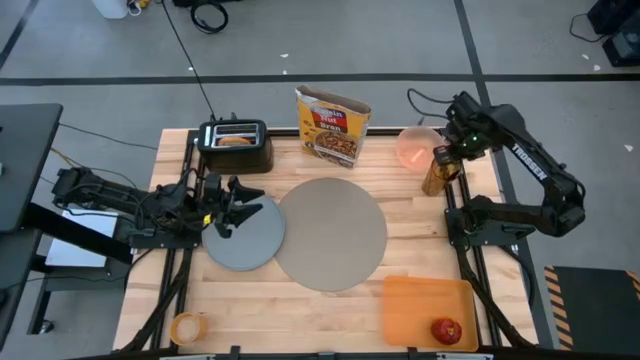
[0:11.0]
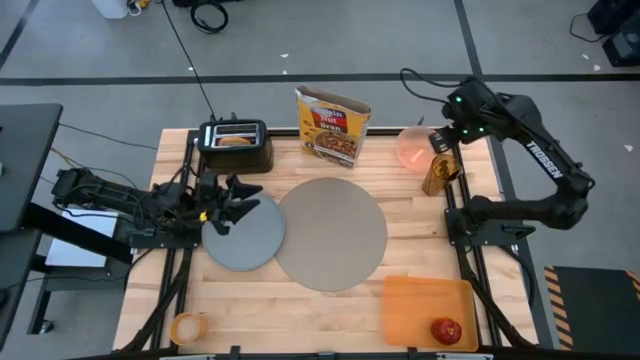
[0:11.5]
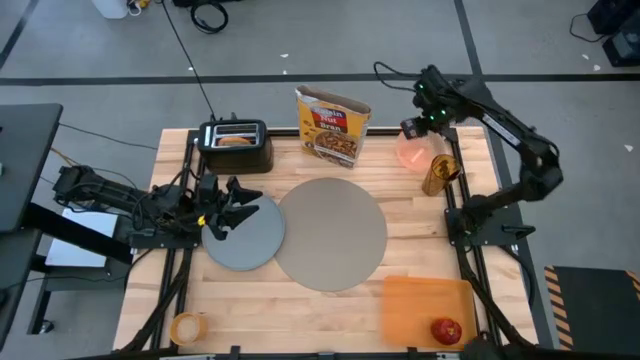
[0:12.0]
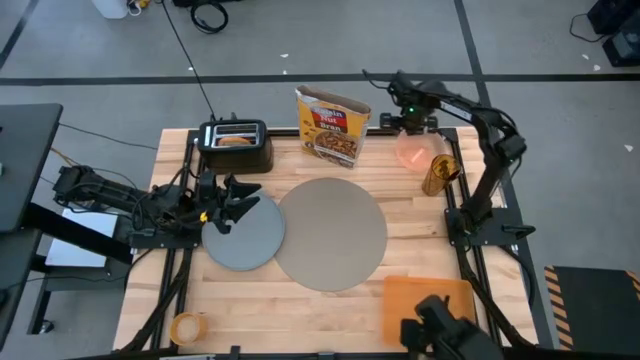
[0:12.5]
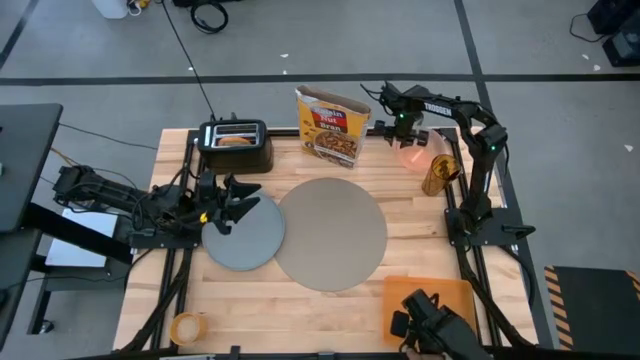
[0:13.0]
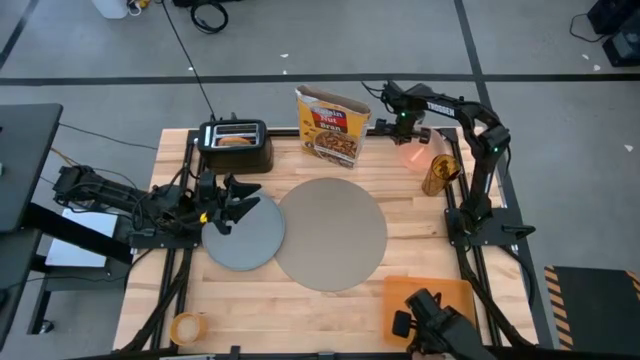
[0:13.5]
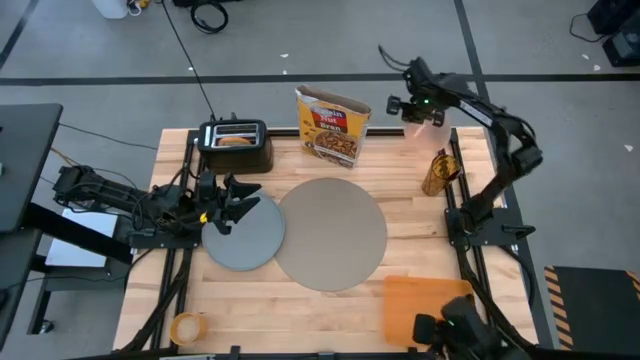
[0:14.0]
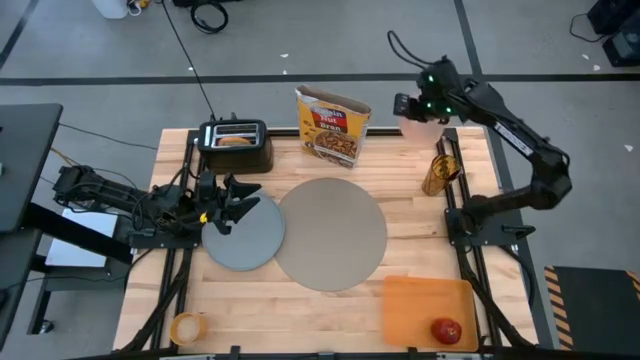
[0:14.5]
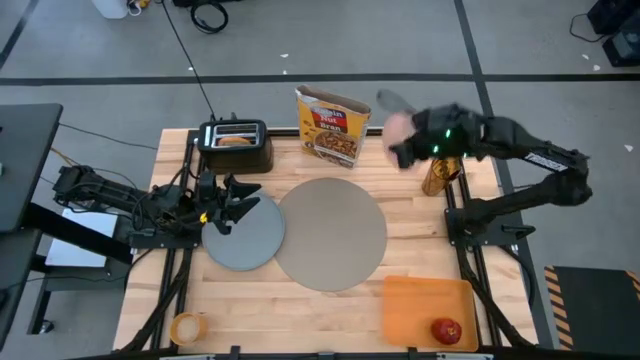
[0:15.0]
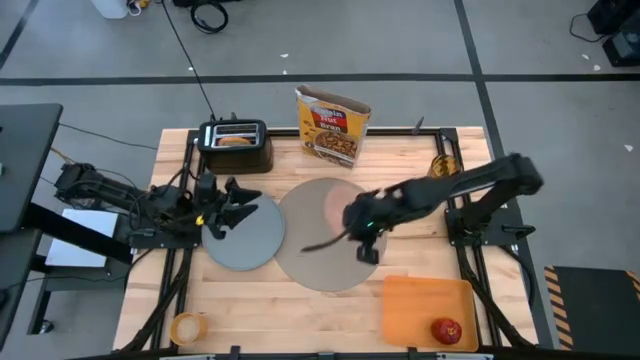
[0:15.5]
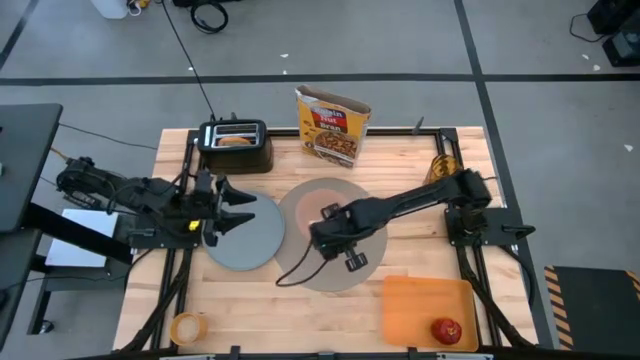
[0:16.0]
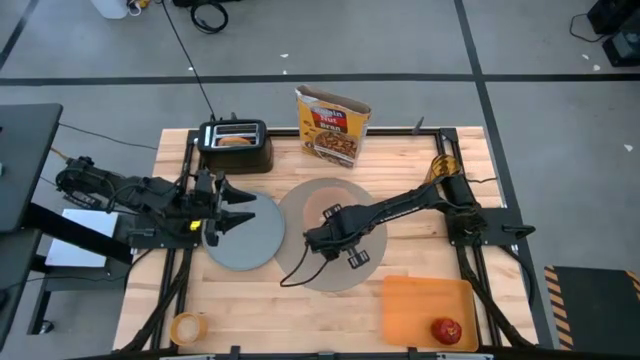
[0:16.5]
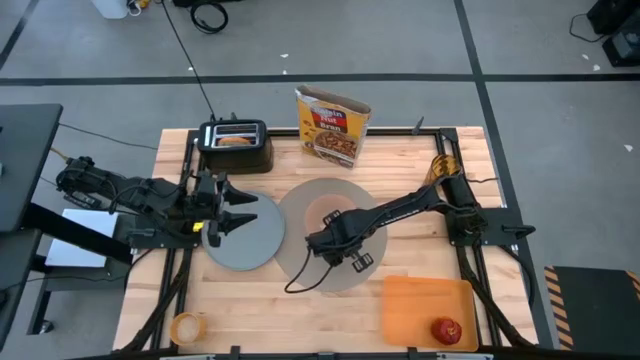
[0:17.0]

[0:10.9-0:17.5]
Task: Arrange a breakfast setting
Put the orange bowl on the gray placemat

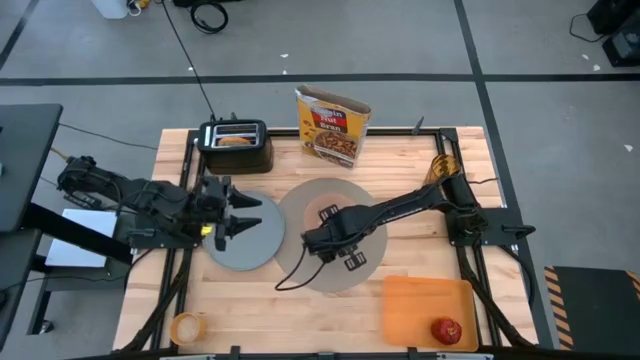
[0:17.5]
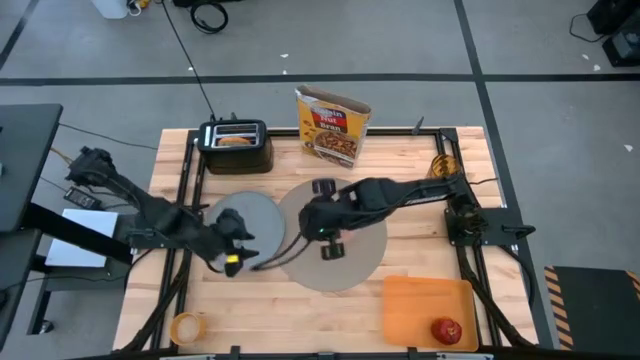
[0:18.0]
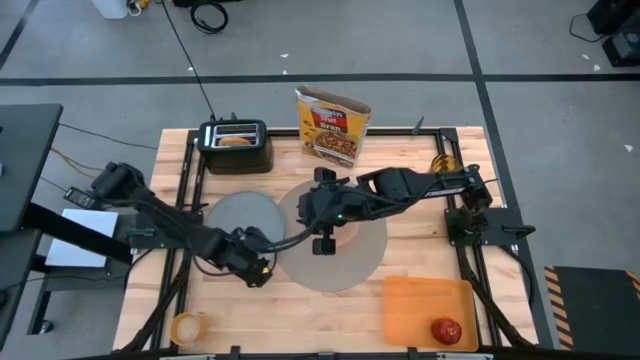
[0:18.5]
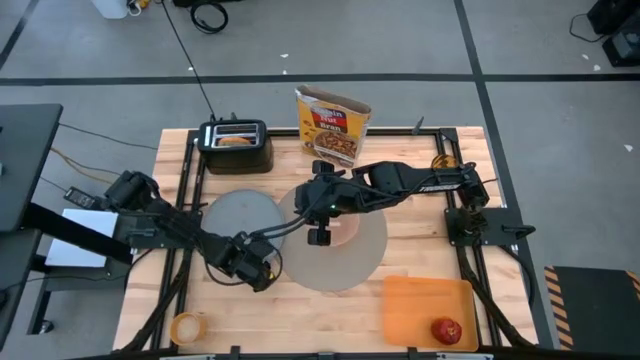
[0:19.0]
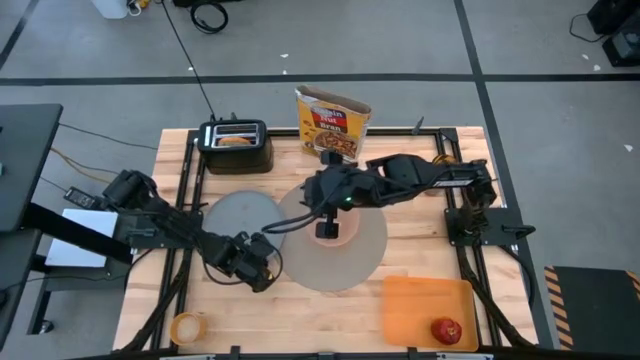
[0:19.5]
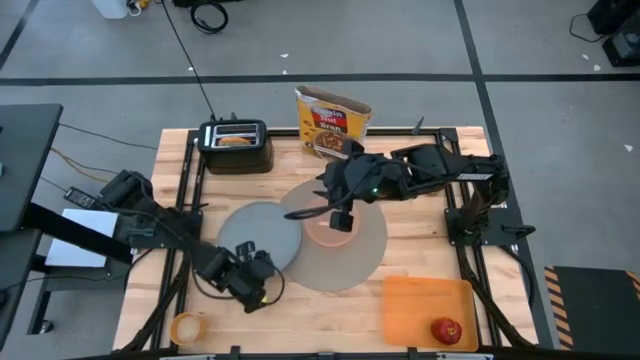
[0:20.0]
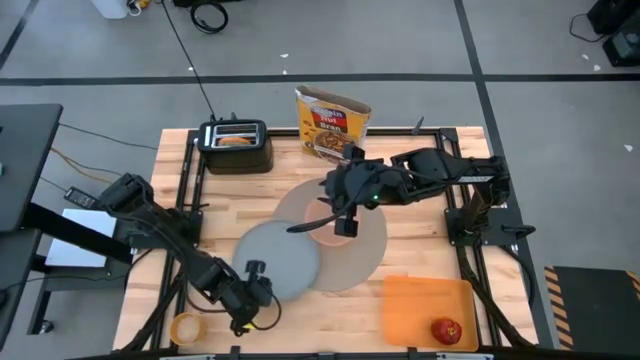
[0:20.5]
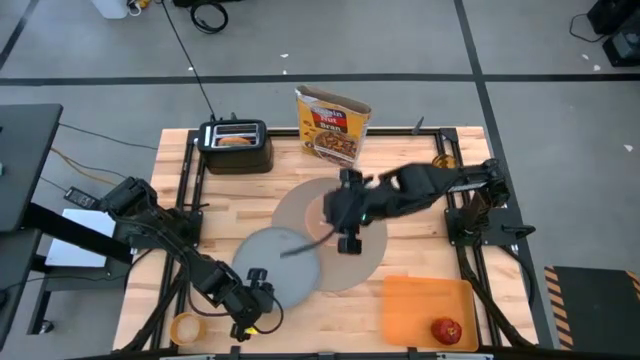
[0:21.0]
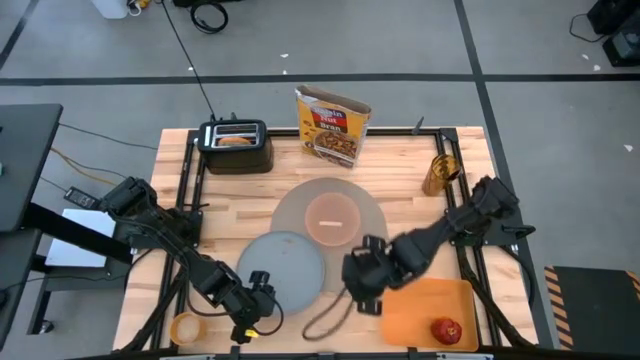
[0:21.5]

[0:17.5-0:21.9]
Put the blue plate on the gray placemat to the bottom left of the orange bowl

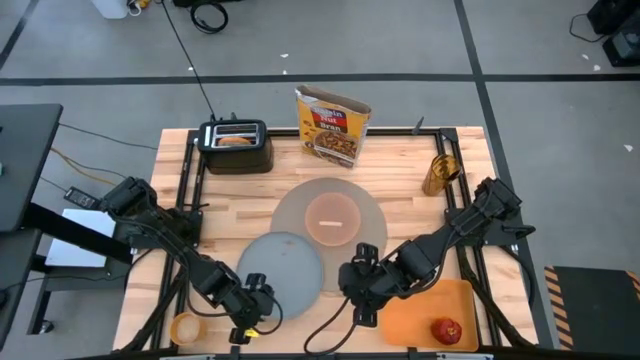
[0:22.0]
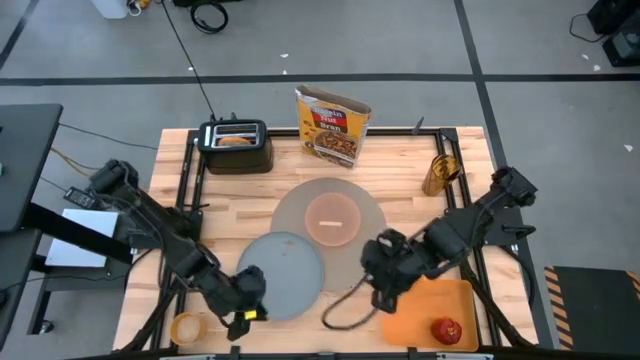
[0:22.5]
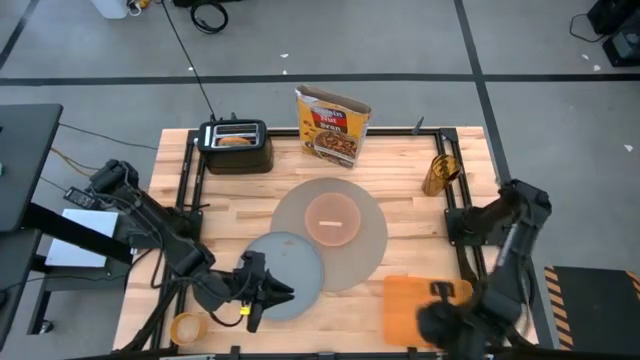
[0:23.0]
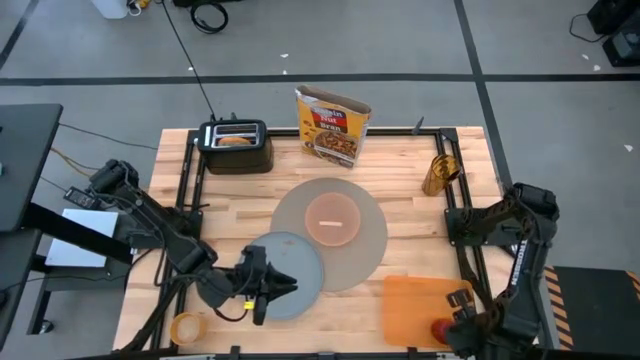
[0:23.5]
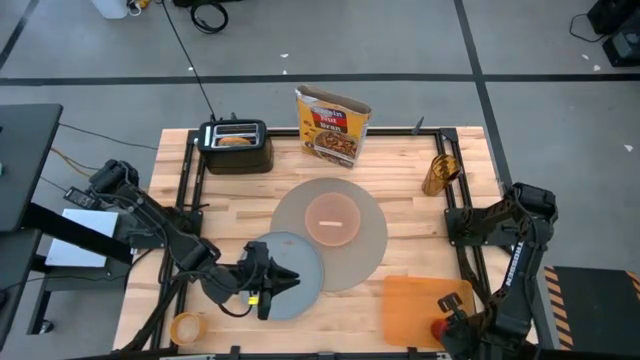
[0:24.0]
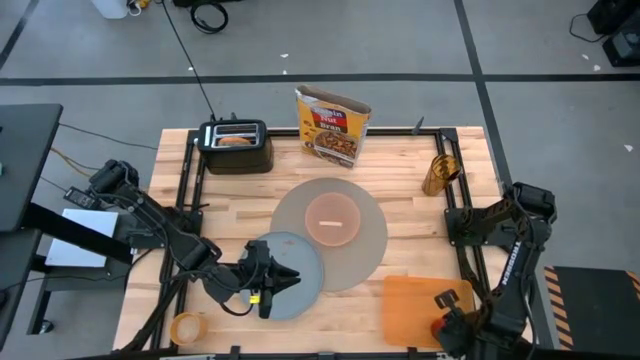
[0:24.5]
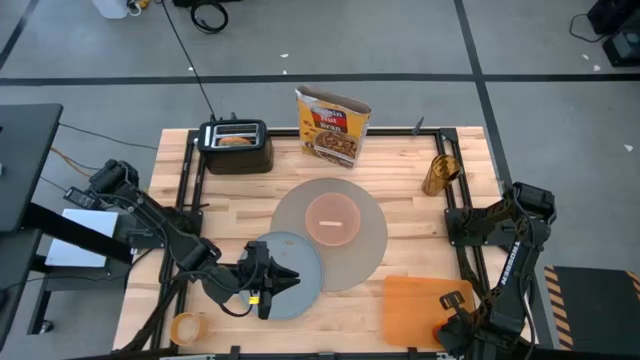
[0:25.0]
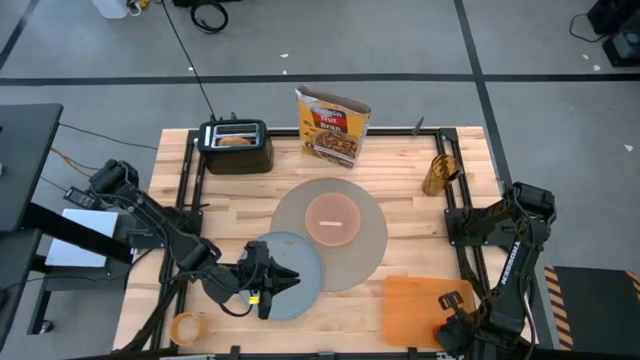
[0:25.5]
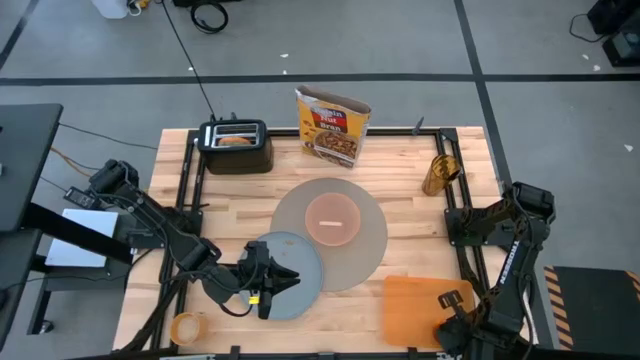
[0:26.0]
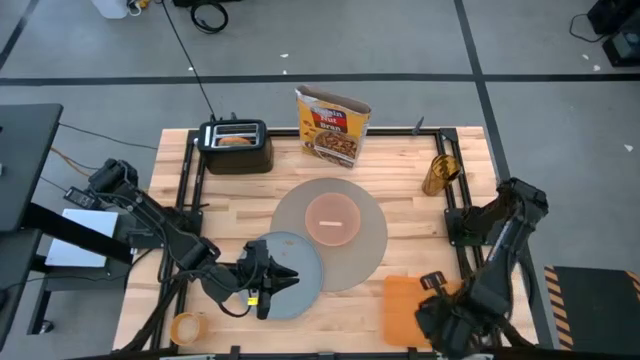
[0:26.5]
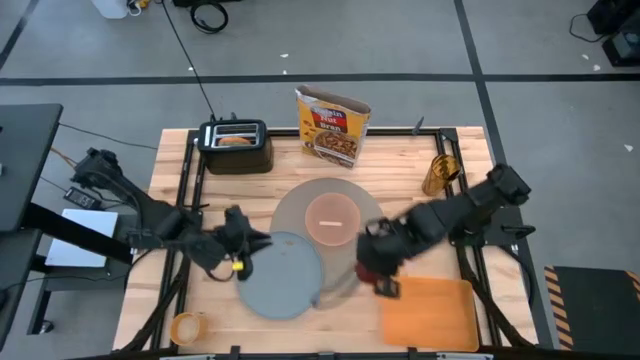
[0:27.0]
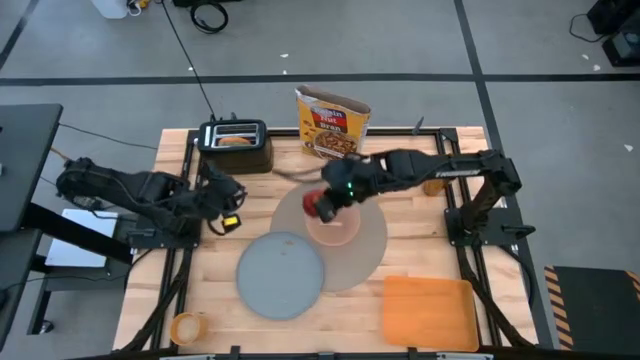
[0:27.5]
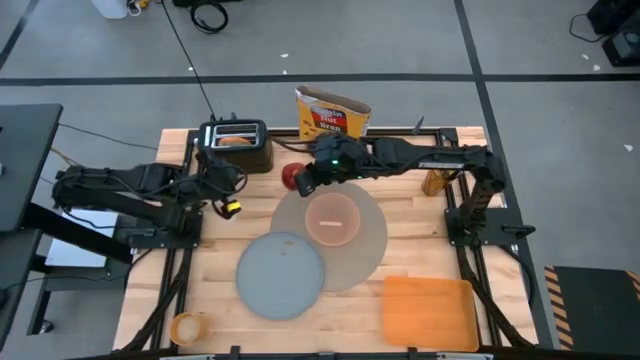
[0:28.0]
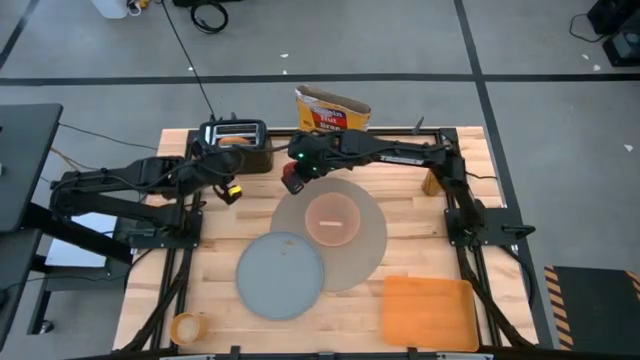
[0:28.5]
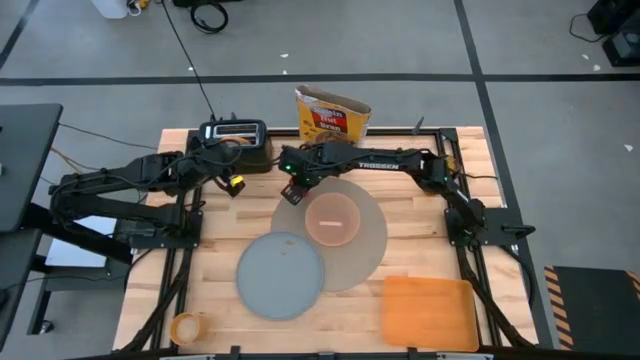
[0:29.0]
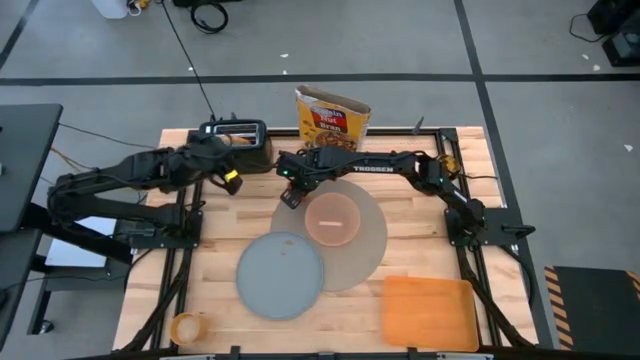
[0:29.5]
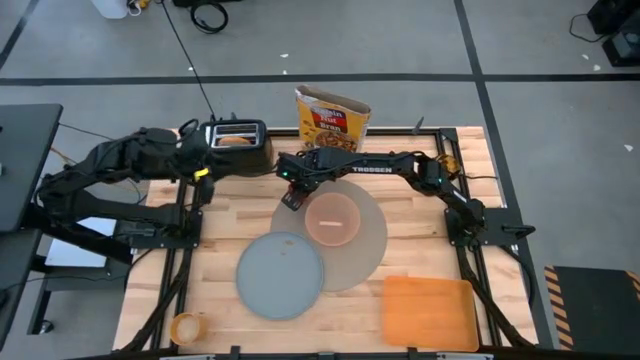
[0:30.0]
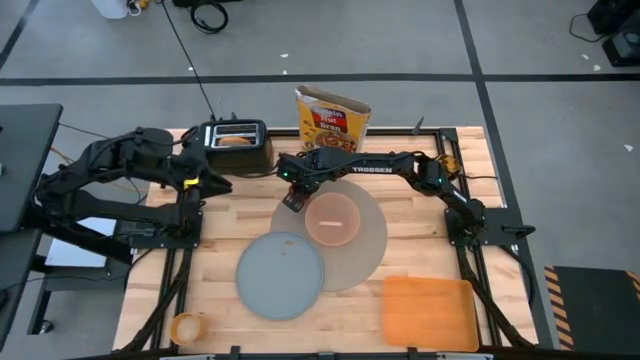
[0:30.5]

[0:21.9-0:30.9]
Put the red apple on the gray placemat at the top left of the orange bowl

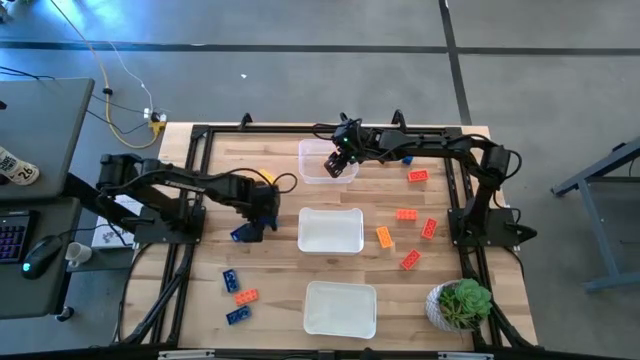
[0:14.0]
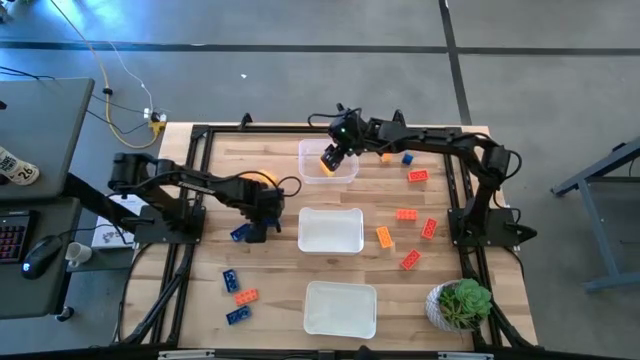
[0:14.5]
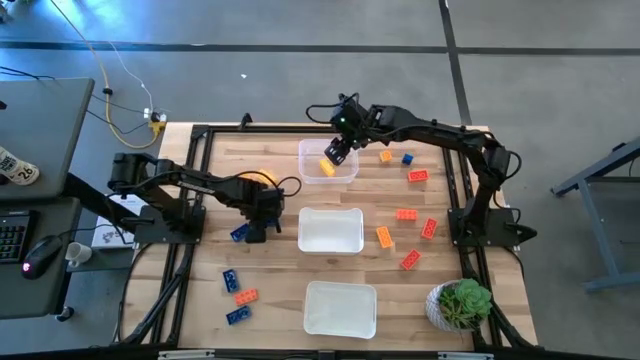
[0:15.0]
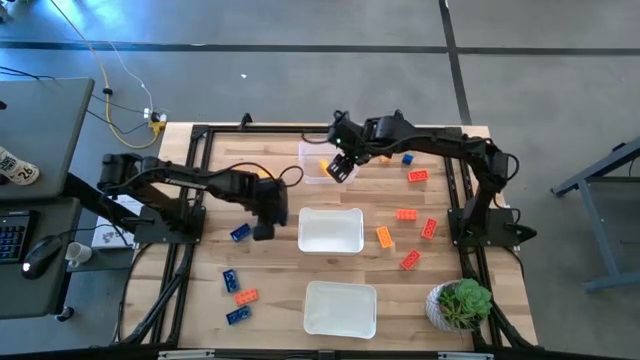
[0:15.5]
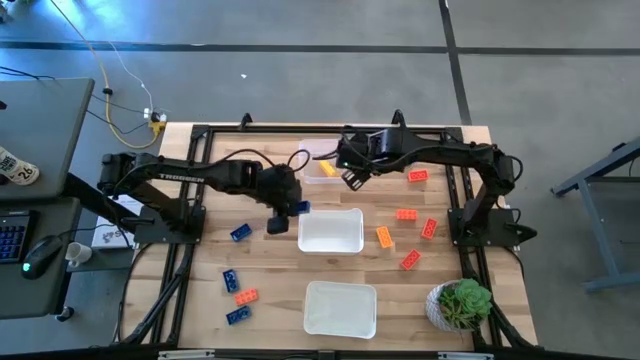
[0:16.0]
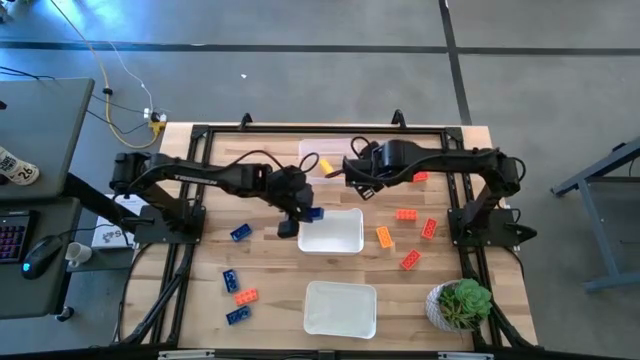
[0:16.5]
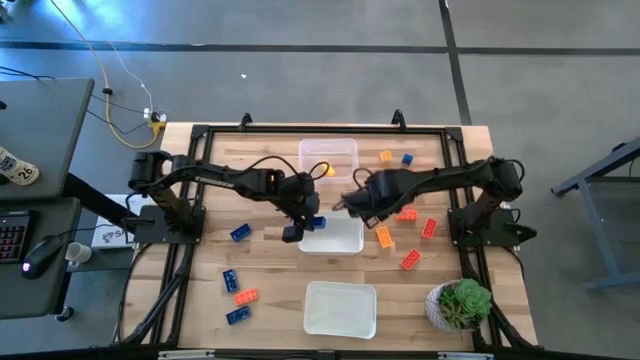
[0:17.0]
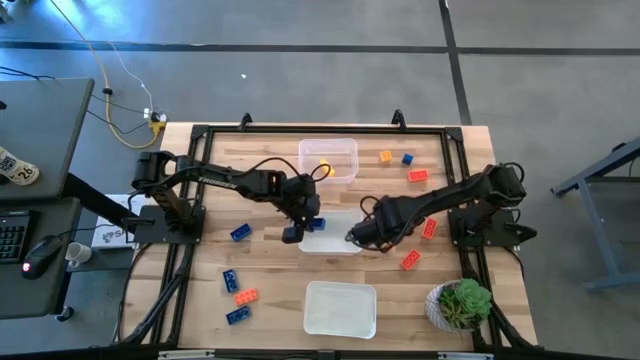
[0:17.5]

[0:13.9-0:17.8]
Task: Sort & place blocks by color
Put the blue game piece into the top white bin
